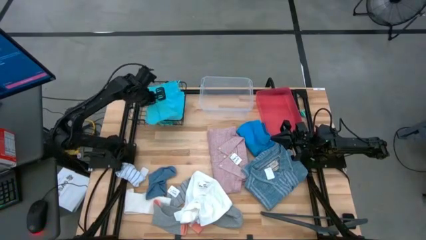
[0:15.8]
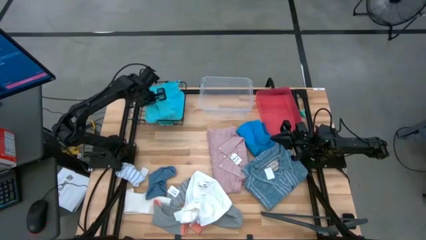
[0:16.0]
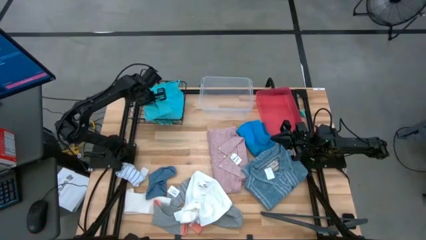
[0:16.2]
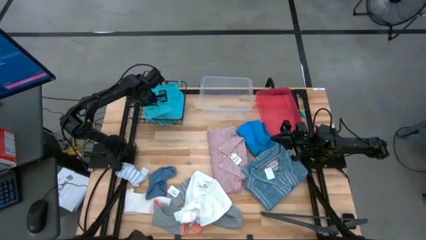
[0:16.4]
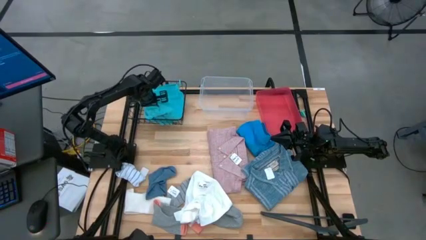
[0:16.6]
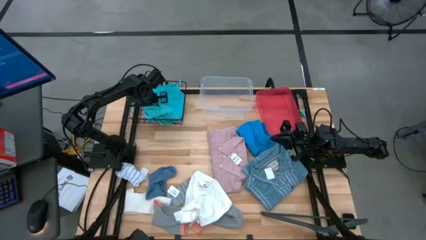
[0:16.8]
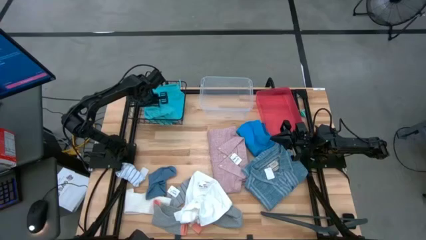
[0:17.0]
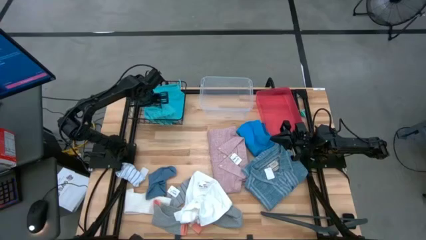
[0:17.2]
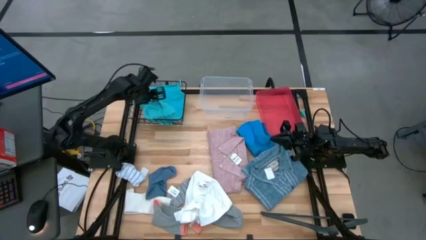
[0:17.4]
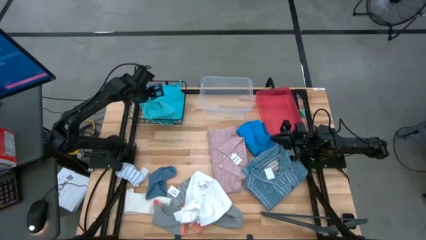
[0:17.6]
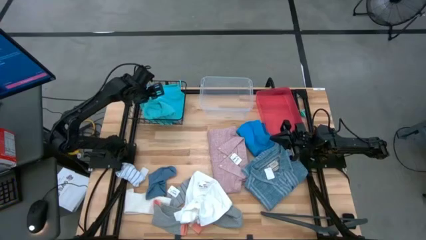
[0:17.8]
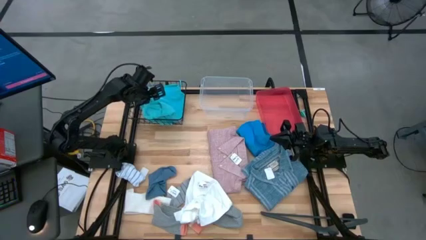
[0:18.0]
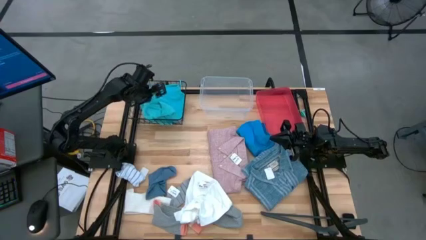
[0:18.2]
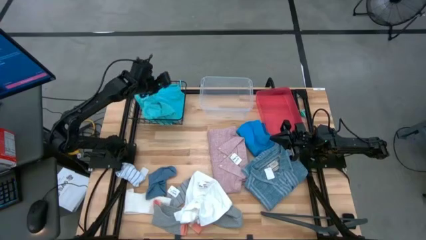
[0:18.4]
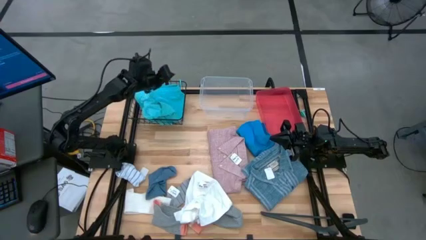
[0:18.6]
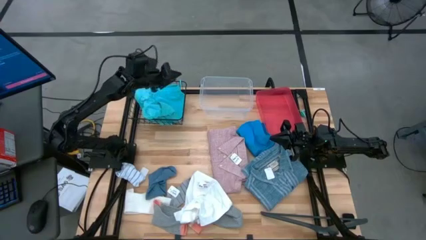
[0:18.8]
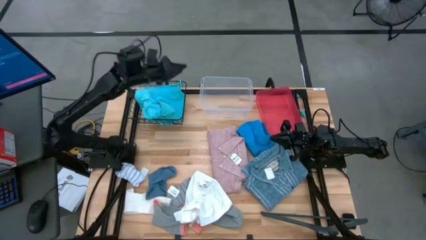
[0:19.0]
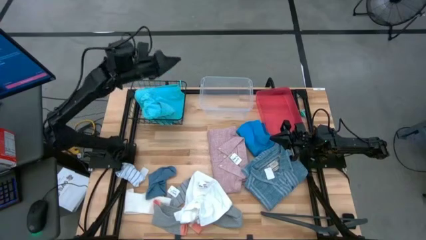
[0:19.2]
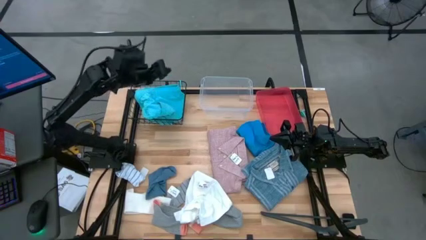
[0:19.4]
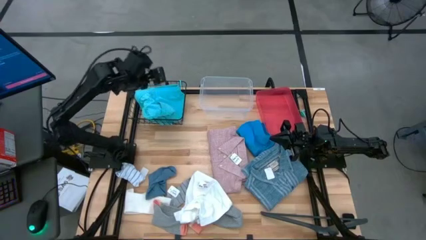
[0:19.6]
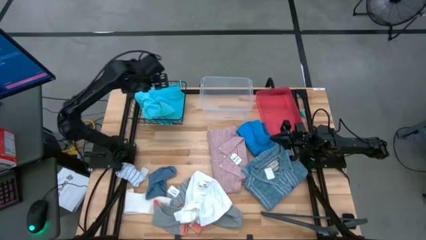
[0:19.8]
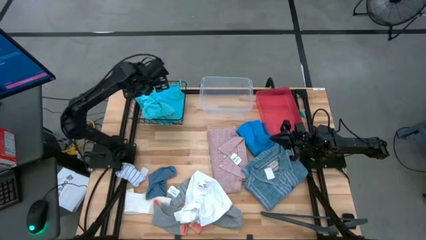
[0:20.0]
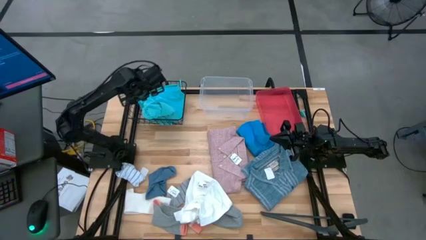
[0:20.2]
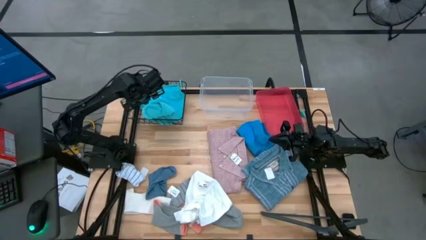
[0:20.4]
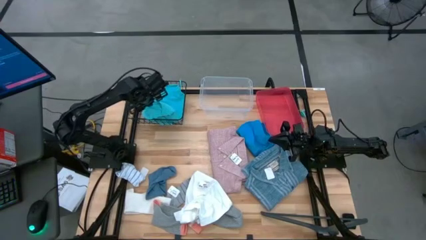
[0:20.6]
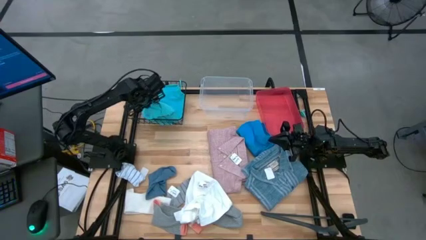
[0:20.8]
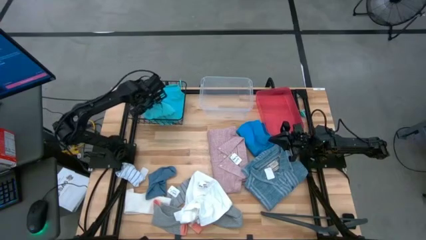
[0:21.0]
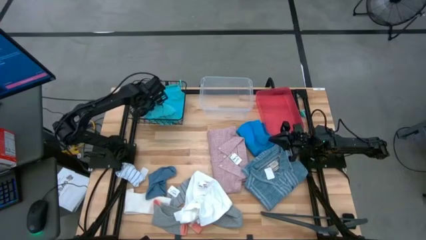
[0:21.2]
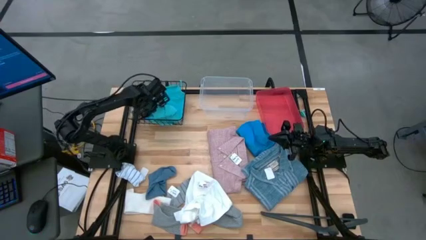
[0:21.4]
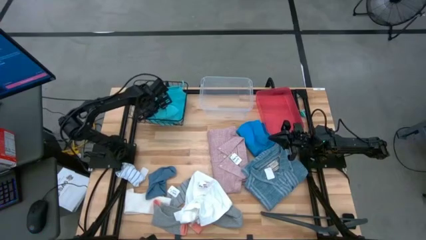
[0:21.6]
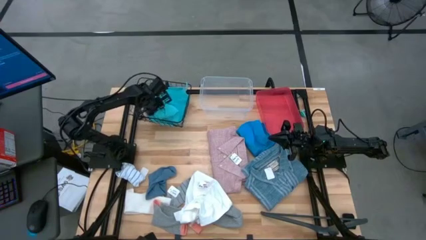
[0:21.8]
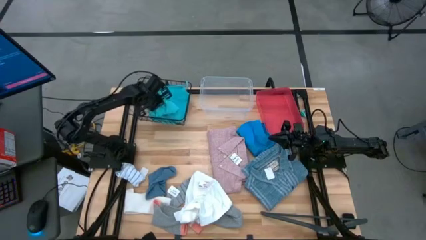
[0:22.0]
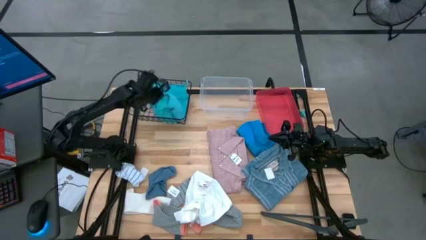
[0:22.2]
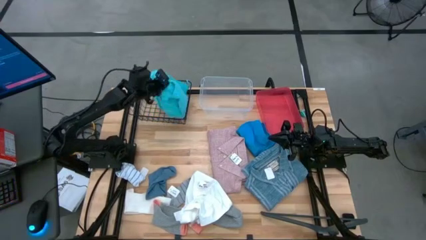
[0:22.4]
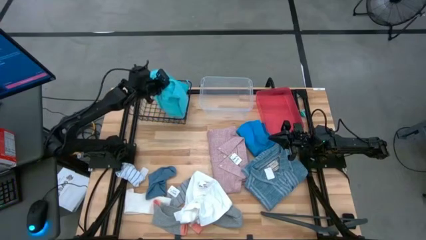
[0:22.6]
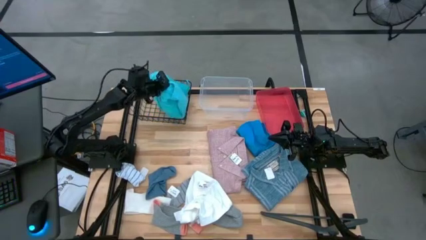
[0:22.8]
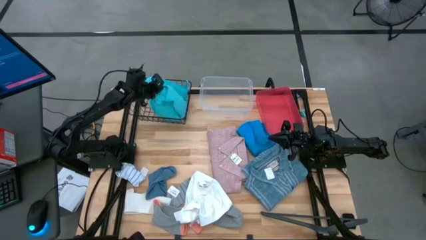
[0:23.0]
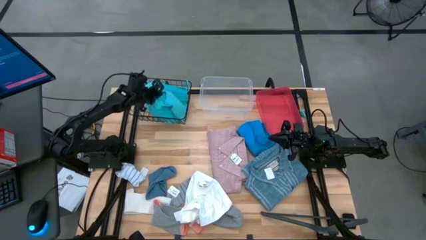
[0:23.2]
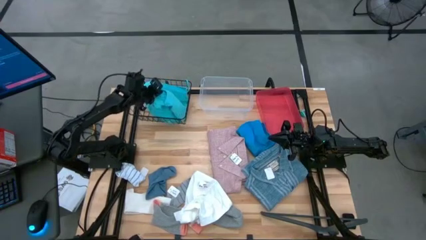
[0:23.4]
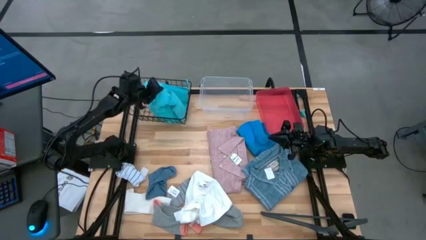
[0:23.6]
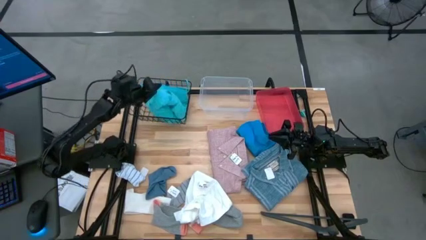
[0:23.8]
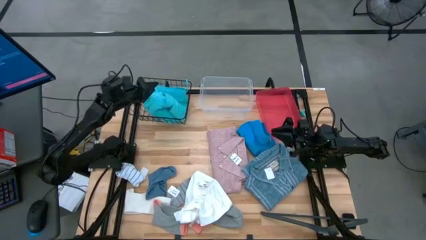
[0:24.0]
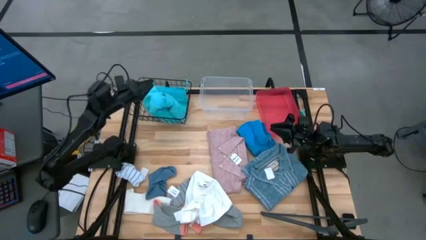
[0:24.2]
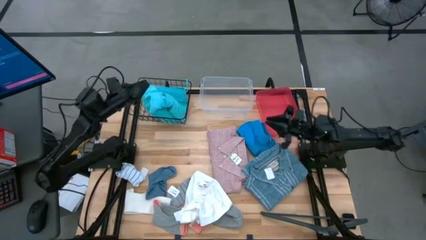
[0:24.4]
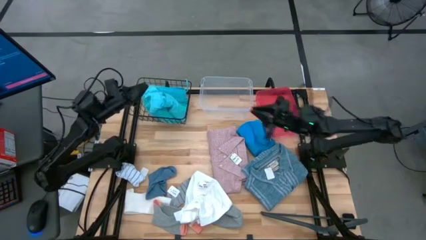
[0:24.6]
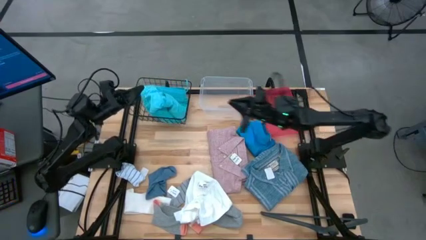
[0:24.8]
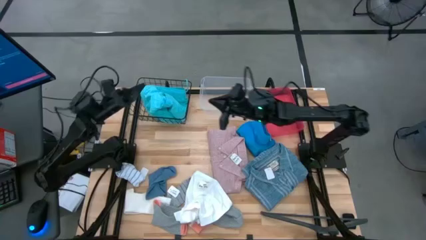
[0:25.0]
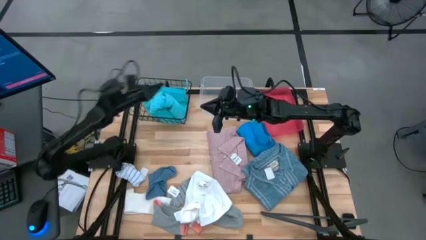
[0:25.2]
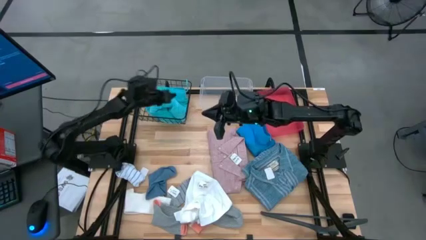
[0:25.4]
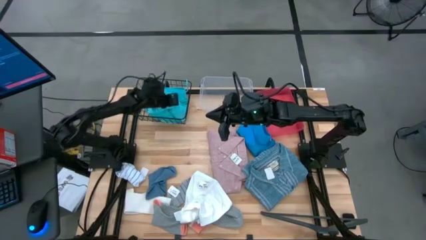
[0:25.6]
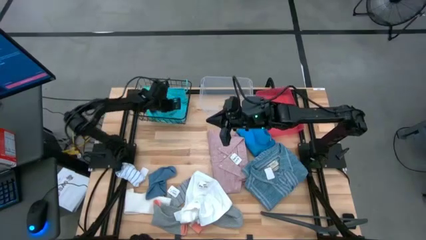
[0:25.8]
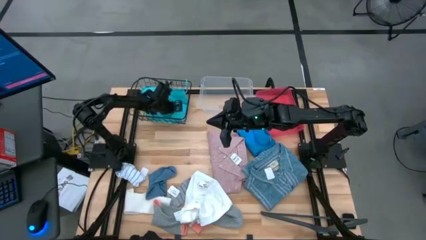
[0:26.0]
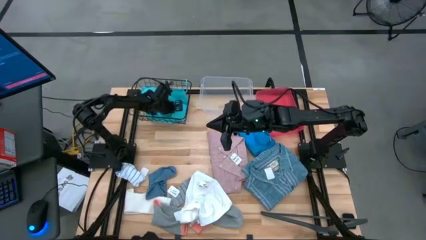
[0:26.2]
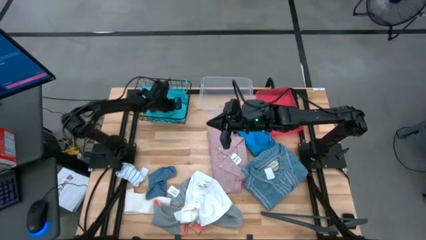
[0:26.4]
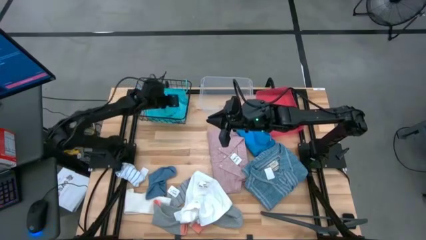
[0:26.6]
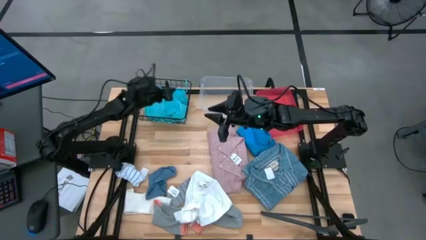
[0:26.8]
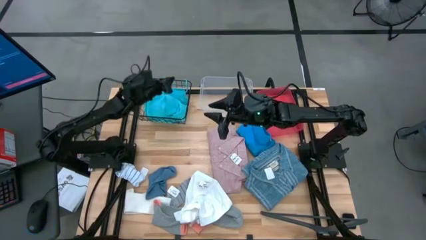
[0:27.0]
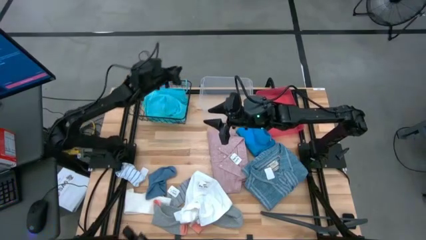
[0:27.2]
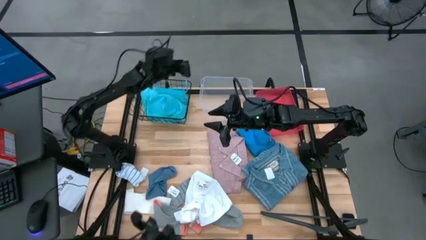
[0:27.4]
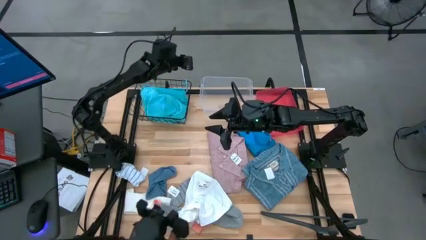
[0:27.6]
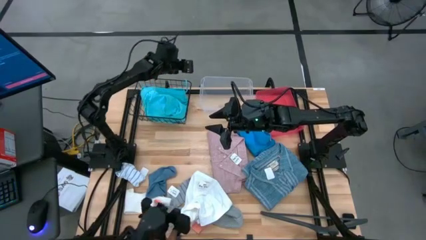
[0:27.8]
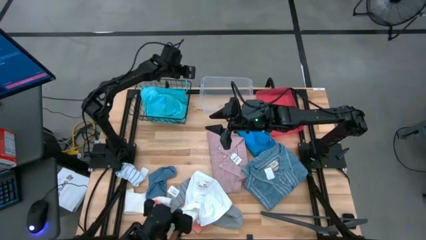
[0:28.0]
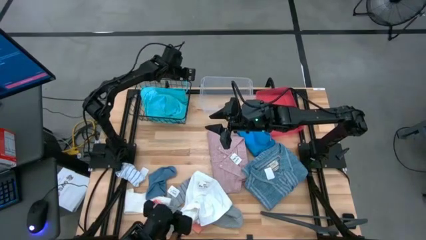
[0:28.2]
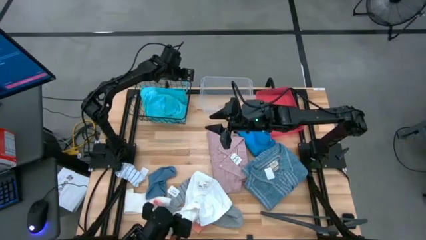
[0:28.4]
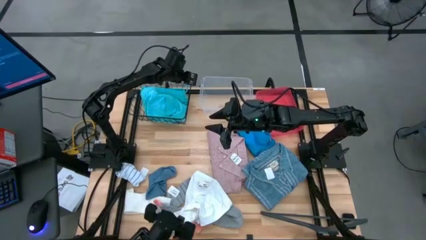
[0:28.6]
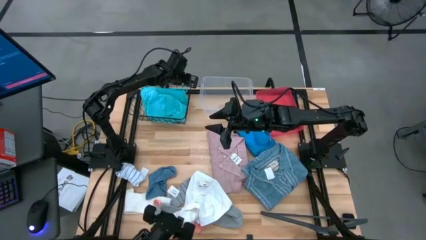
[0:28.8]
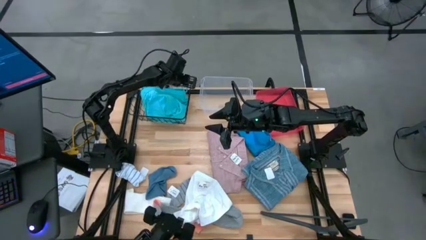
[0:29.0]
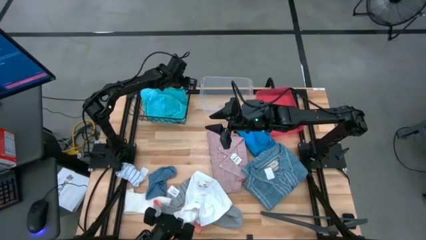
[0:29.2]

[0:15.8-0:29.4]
Task: Pick & Place Cloths
Put the light blue shorts into the black wire basket

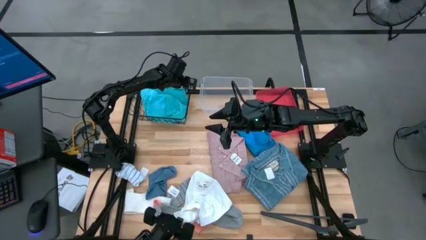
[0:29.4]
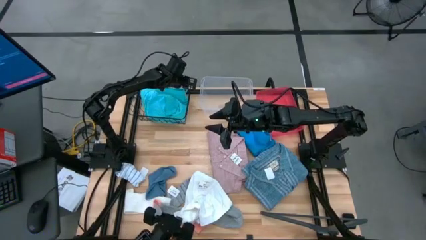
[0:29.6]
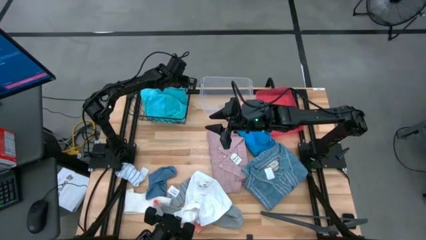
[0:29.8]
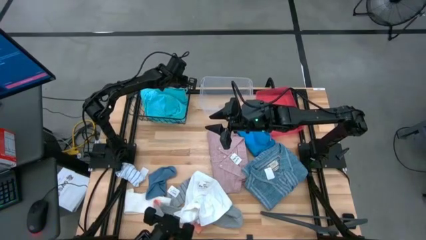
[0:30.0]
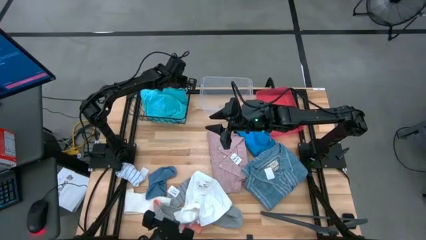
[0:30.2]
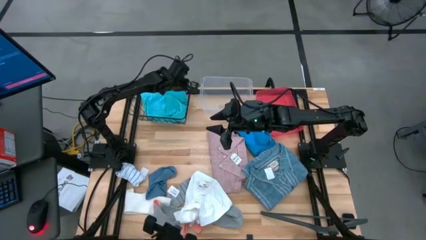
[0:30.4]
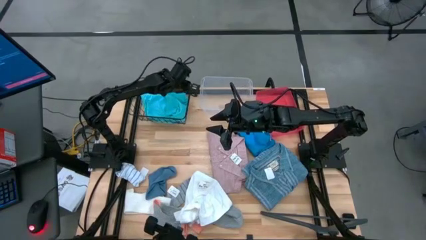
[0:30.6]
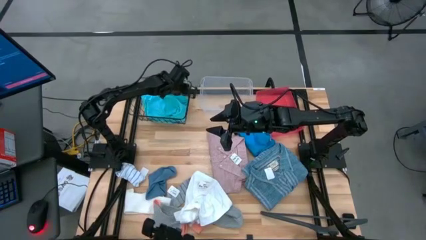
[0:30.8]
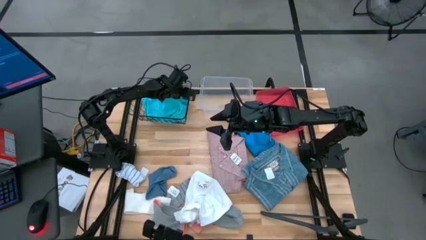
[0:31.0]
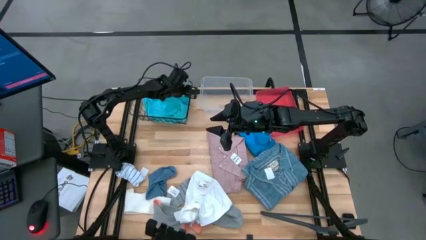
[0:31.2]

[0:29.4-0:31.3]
Put the light blue shorts into the black wire basket
